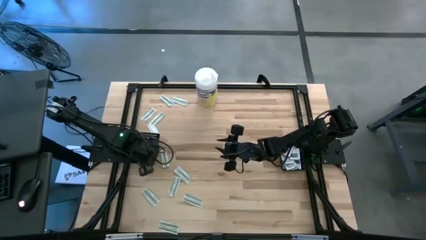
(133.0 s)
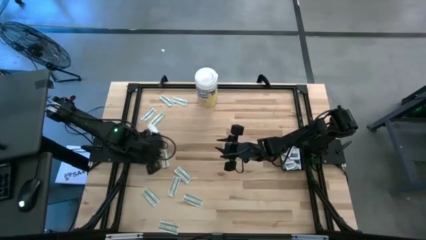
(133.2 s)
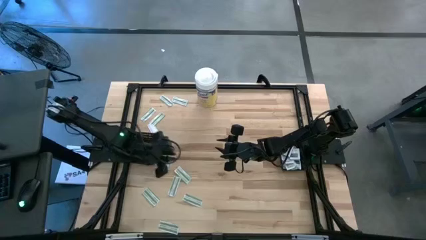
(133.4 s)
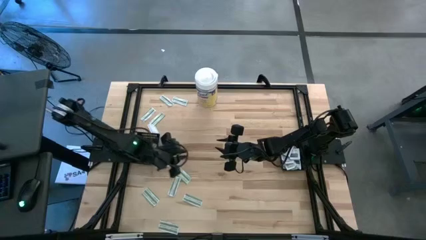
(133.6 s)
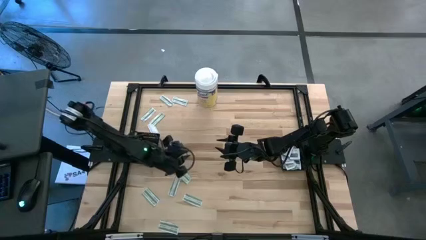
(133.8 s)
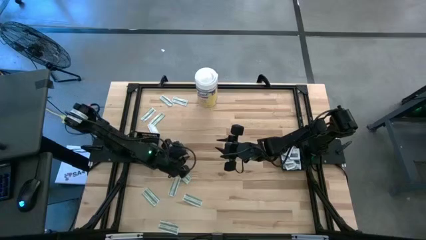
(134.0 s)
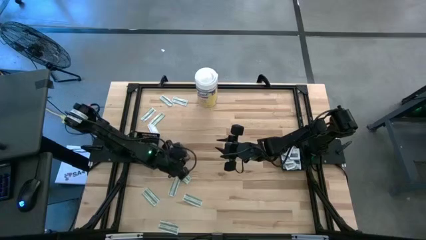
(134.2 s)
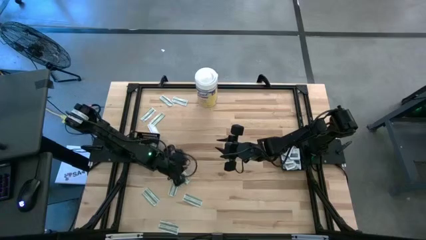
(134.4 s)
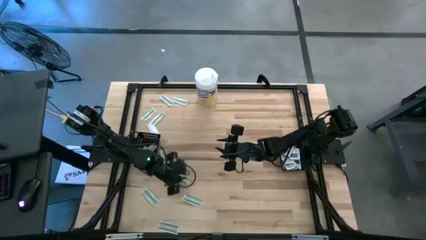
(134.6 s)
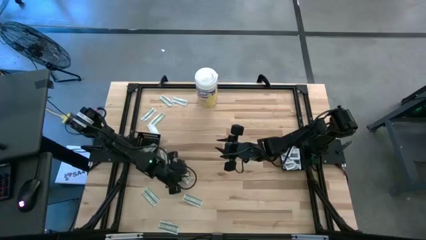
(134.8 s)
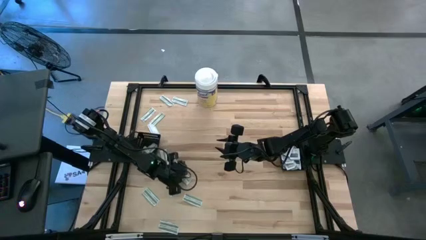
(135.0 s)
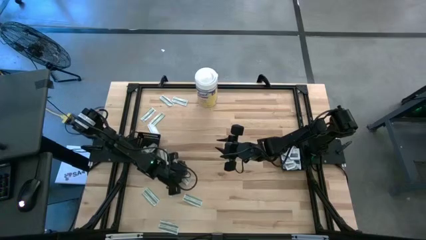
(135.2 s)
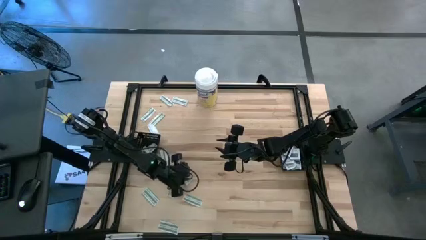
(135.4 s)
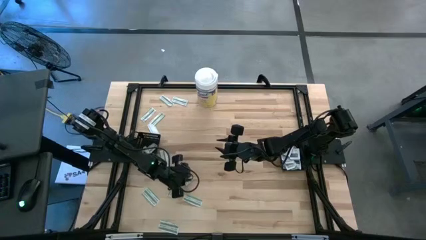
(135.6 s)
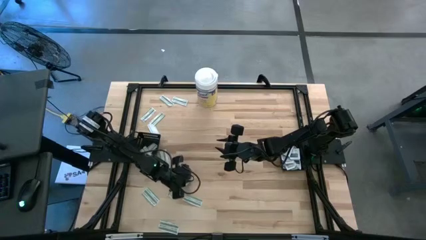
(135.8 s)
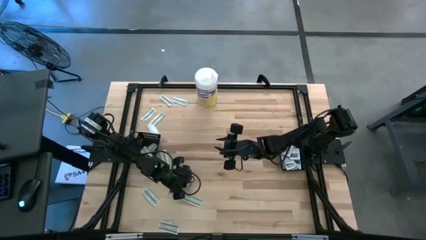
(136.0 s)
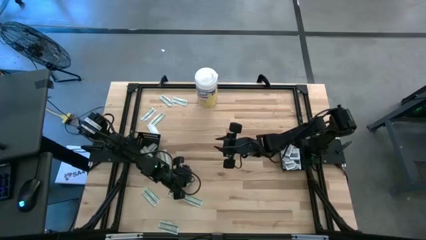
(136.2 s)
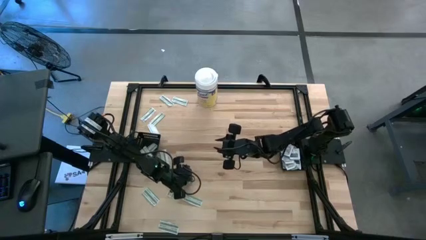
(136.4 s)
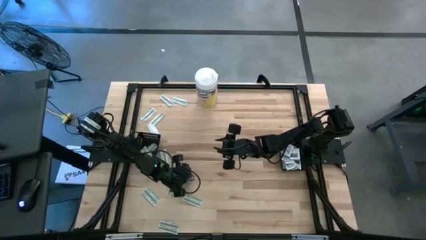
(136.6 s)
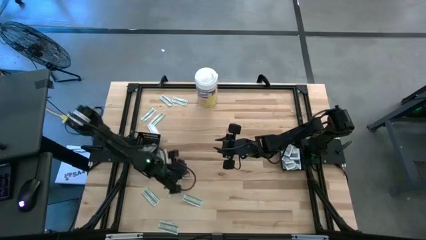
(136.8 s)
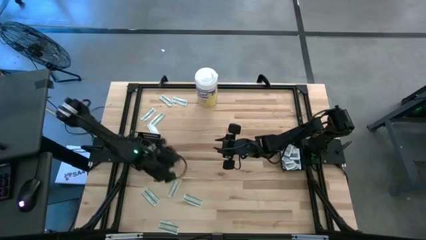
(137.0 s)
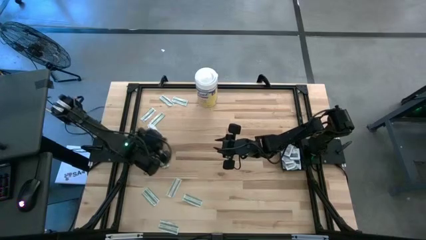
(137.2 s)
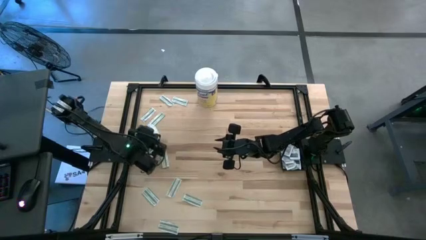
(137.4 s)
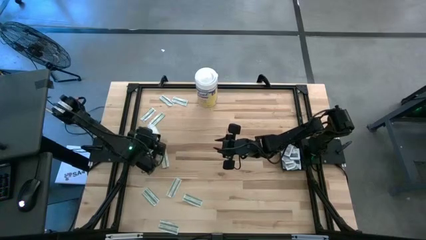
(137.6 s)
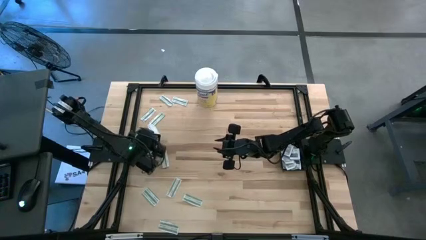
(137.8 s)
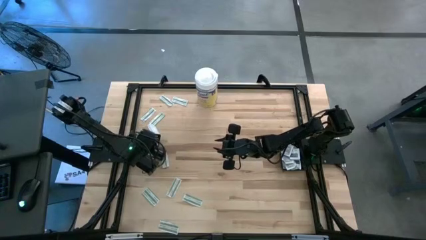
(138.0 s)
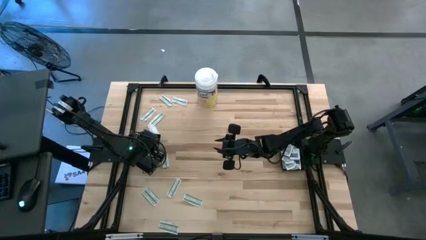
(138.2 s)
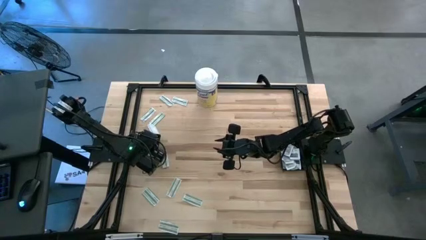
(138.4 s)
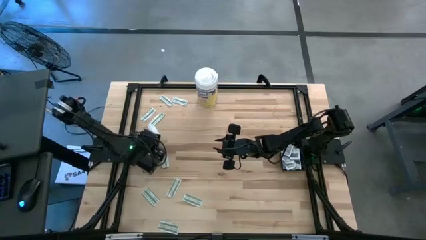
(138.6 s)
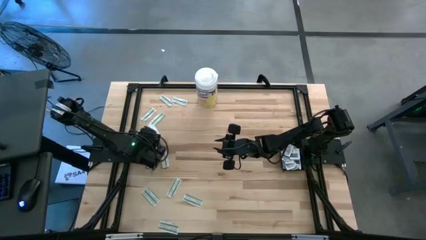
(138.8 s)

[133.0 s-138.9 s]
Task: Pick & Place First Aid Supplies
Put the bandage into the left black basket

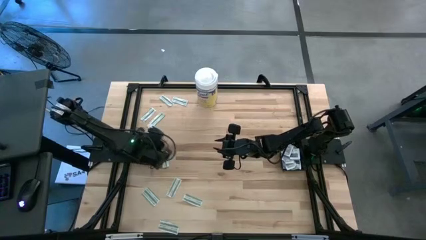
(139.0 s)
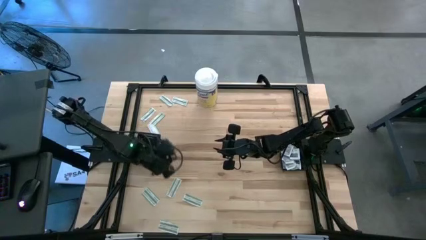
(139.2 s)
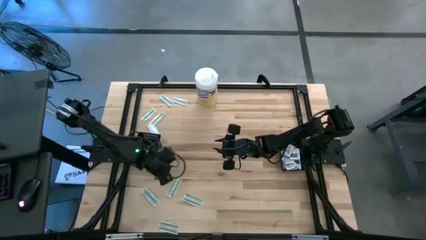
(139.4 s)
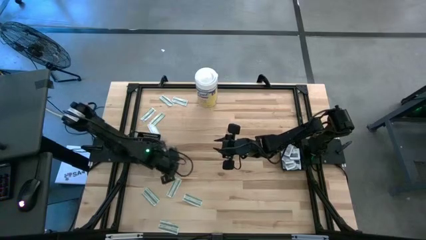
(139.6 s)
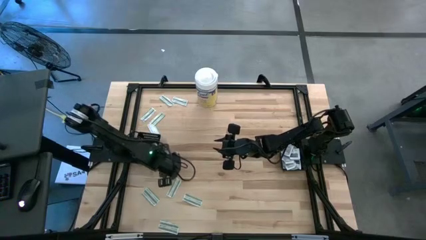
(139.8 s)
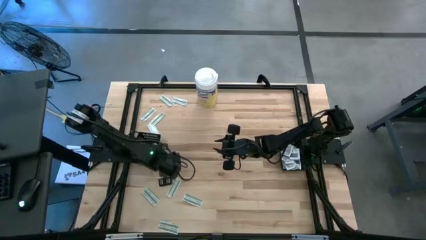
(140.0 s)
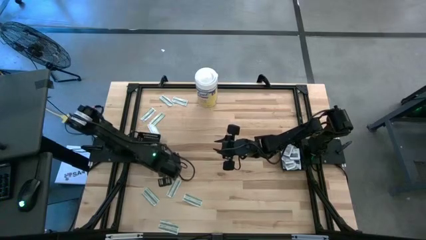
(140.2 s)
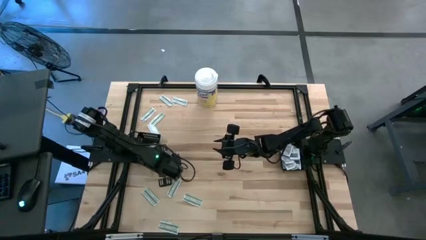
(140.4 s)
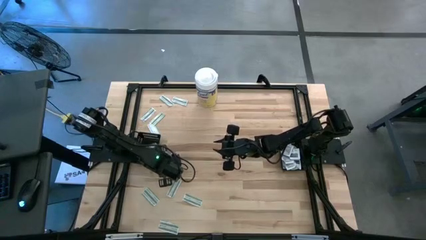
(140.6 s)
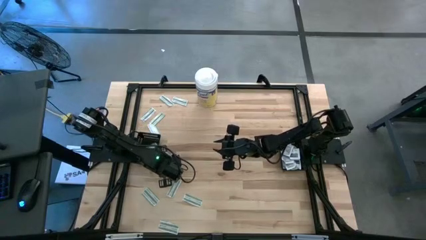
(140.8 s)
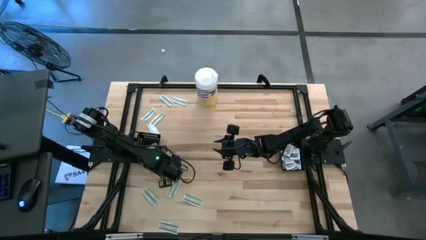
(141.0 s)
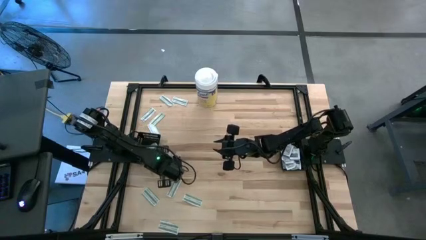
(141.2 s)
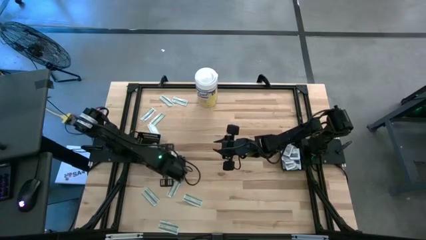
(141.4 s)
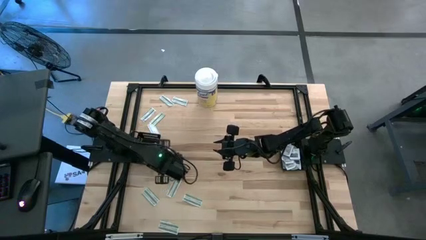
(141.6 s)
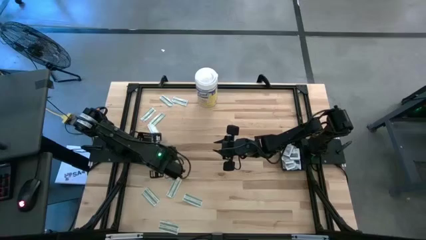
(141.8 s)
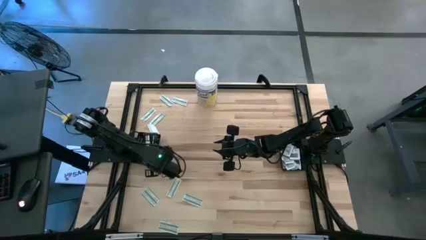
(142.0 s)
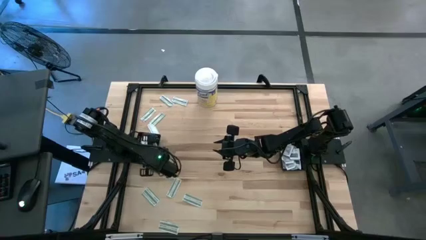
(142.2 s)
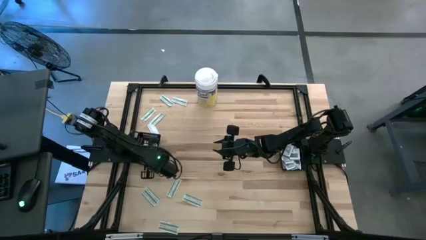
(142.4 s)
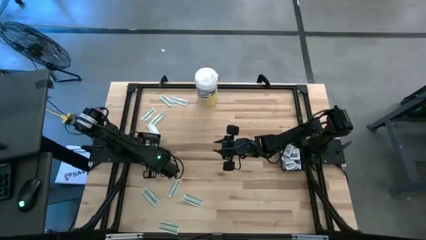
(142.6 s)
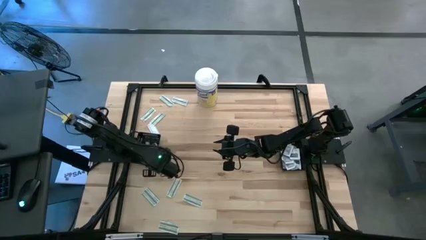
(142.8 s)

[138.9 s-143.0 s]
Put the bandage into the left black basket

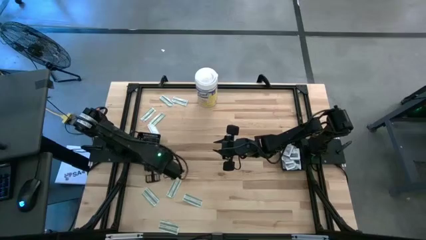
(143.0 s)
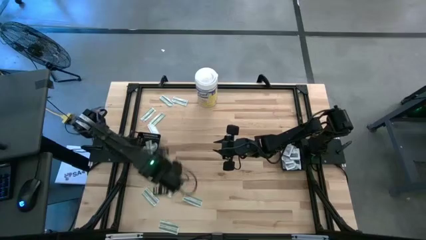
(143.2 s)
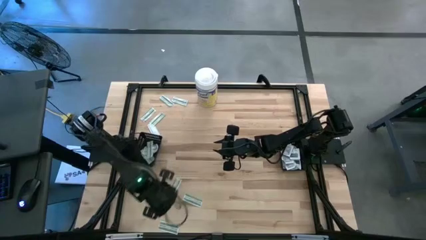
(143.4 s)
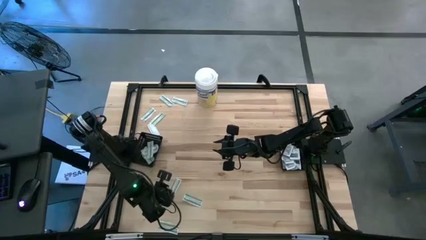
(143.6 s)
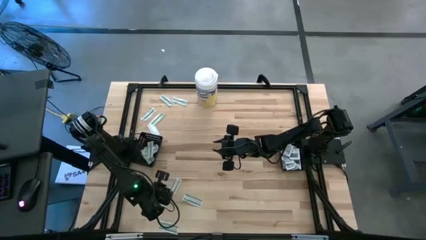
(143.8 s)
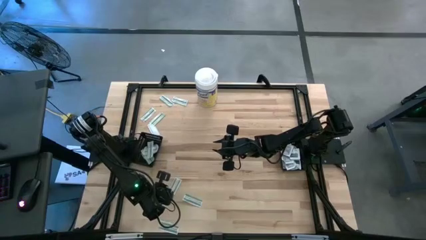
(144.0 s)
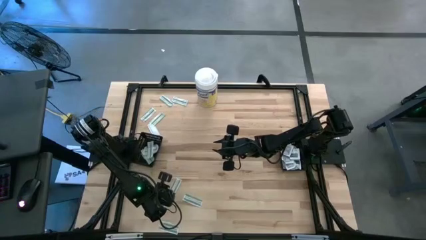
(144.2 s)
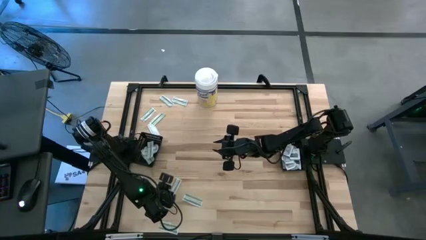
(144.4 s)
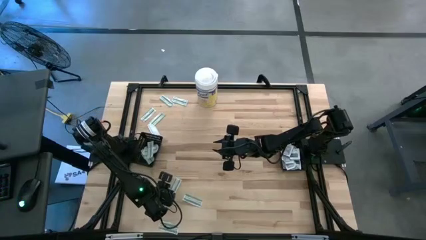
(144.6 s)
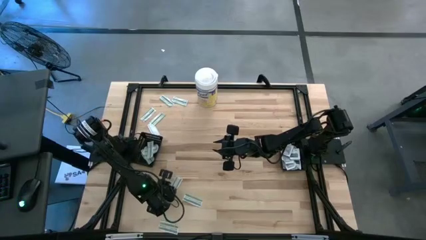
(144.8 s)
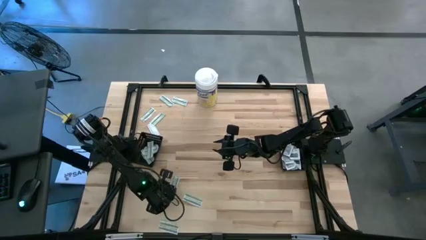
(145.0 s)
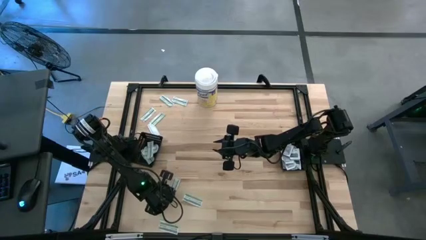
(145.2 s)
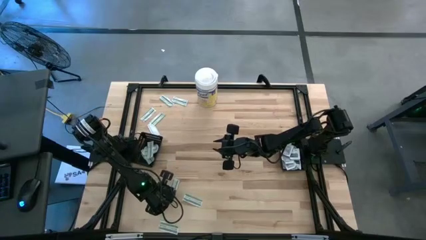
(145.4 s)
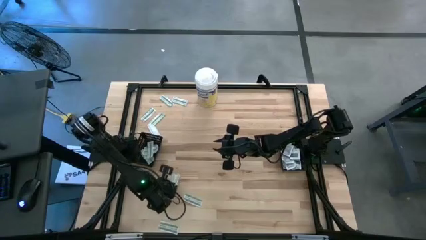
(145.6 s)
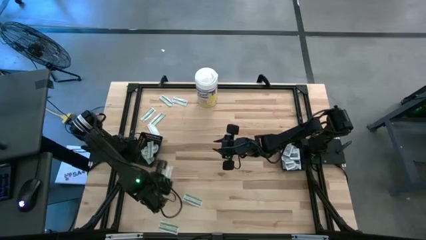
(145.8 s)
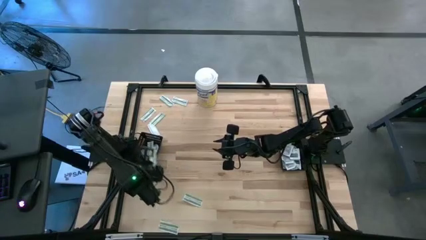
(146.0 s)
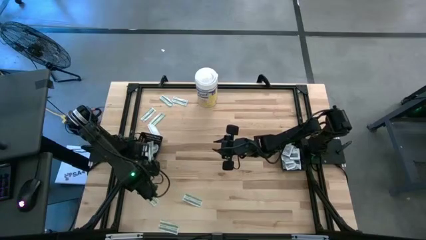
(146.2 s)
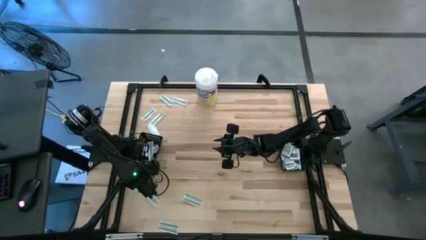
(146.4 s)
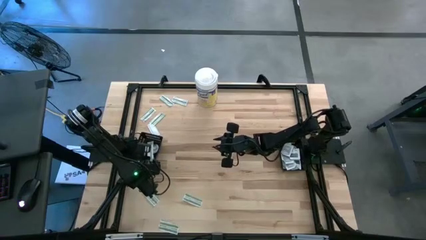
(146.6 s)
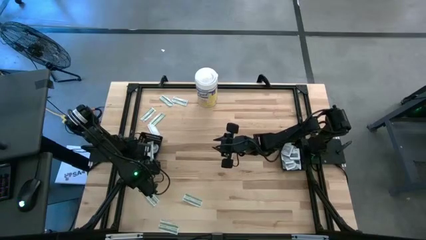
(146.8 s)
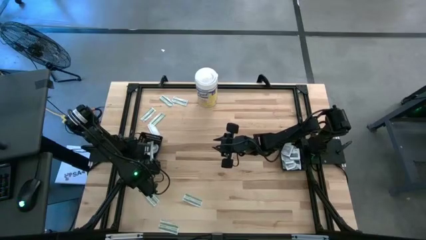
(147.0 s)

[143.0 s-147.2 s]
Put the bandage into the left black basket

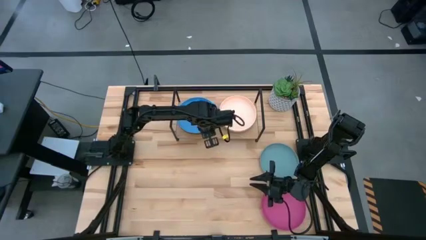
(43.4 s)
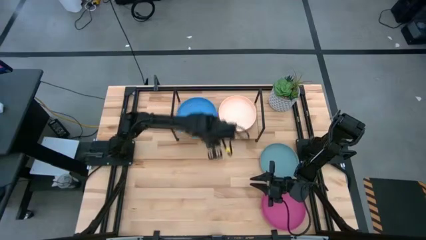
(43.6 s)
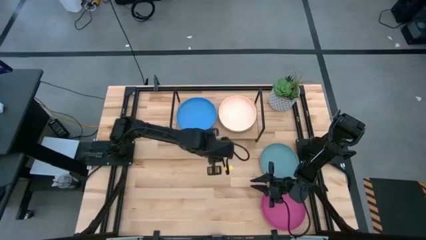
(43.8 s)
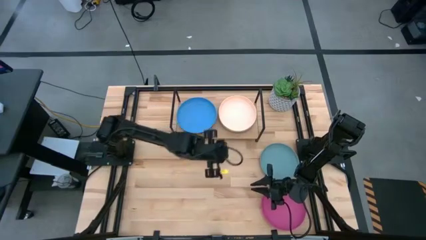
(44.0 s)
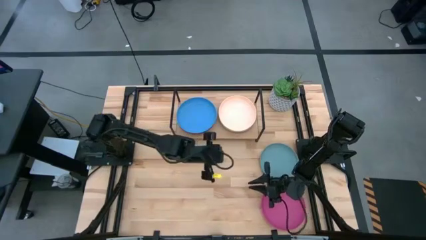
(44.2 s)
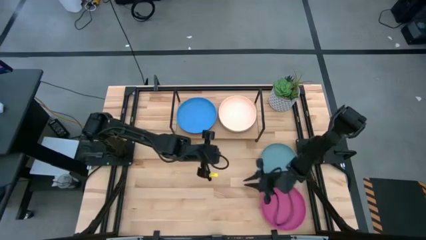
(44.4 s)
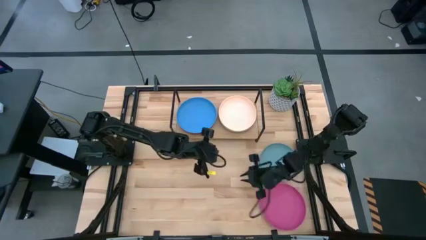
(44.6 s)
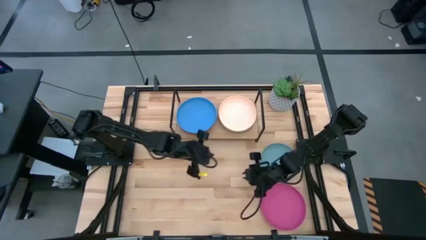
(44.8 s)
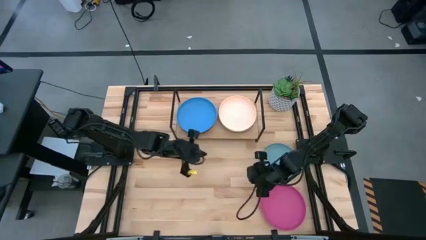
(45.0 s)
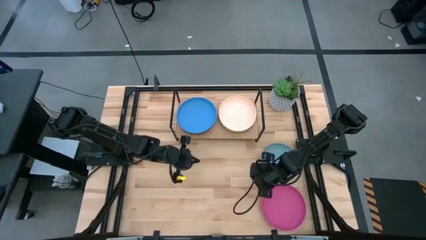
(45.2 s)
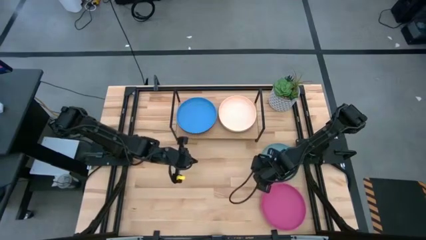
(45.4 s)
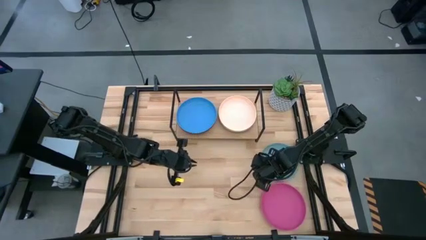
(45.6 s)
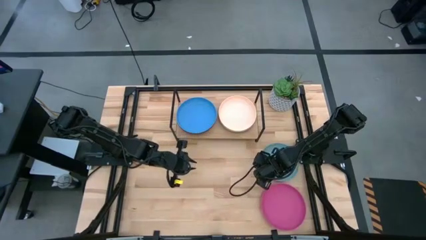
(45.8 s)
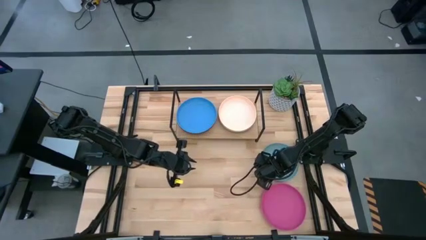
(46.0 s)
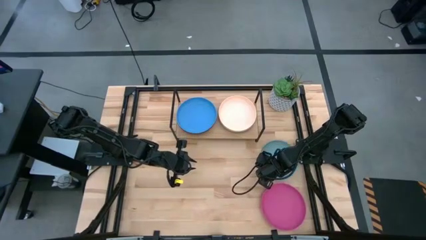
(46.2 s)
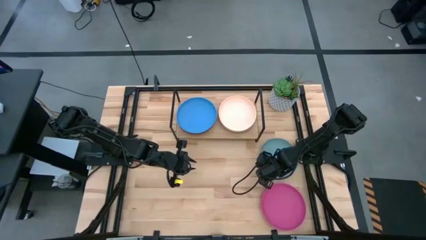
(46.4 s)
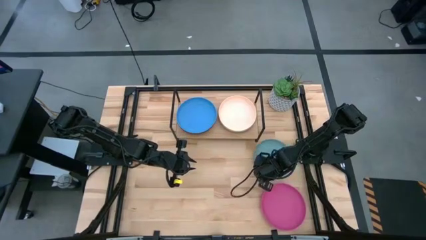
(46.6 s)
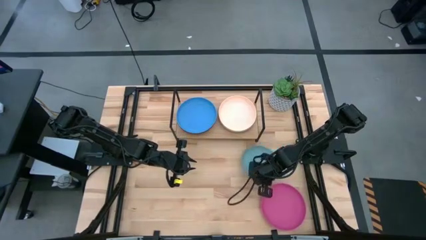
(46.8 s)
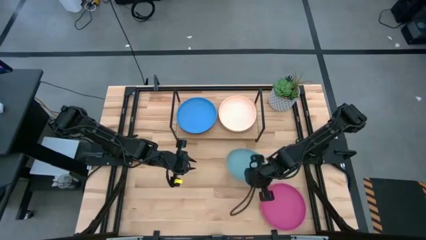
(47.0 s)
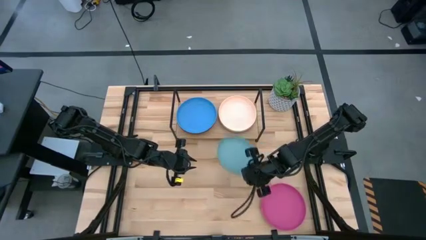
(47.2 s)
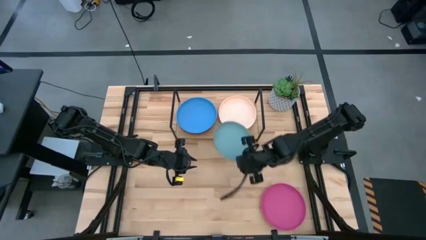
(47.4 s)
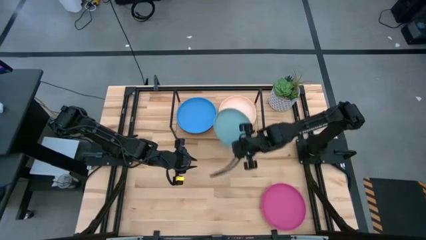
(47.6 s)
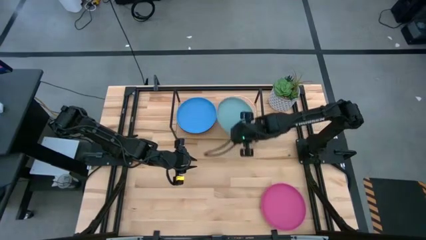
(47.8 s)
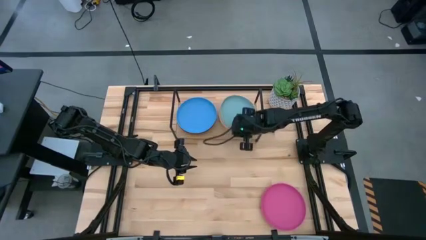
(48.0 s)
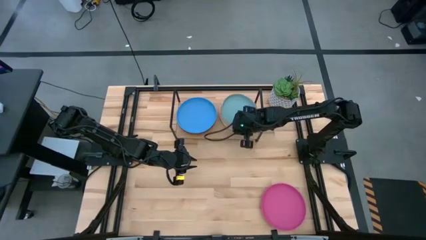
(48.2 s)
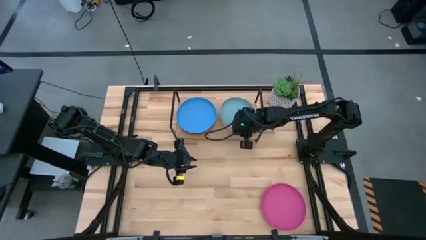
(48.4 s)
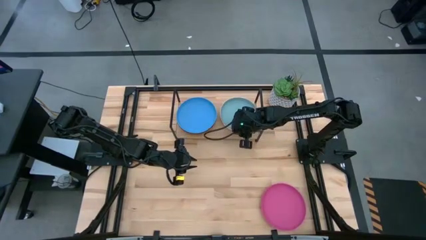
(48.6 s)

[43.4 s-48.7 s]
Task: Place and stack plates onto a shelf
Stack the light blue plate on top of the light orange plate on the shelf
